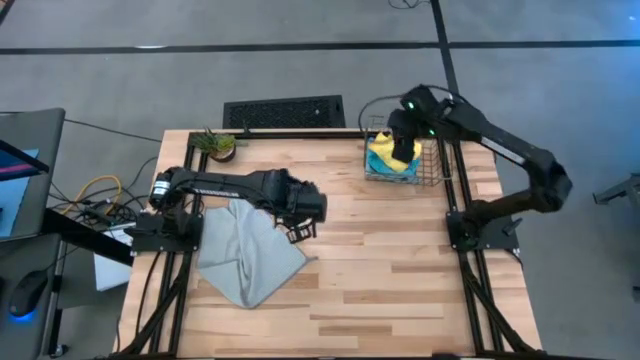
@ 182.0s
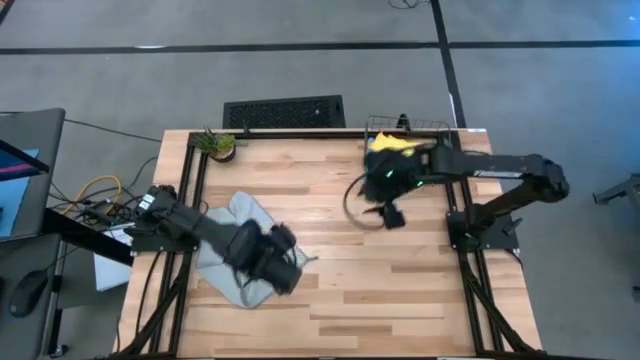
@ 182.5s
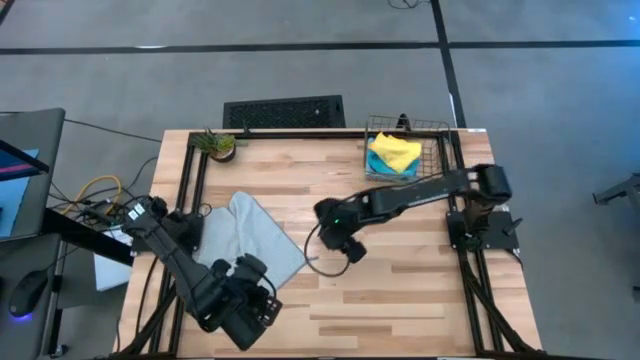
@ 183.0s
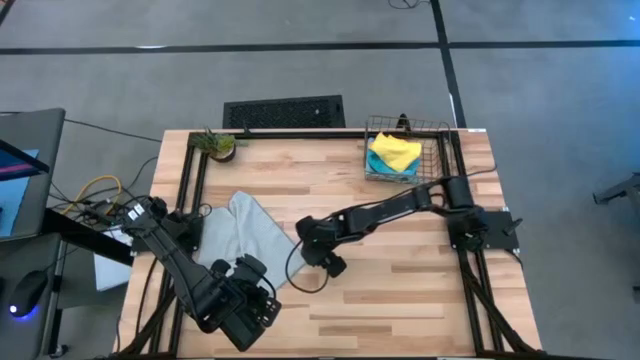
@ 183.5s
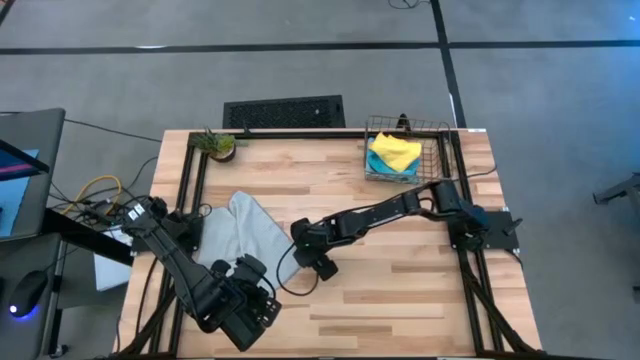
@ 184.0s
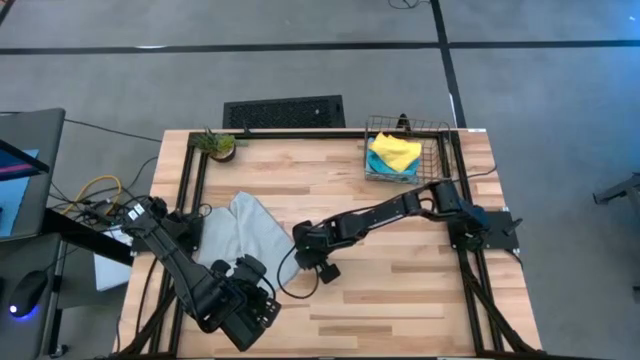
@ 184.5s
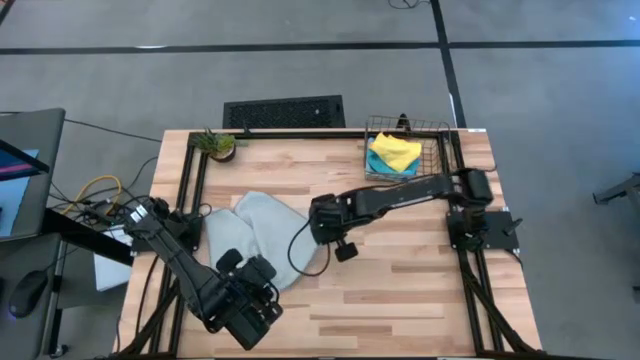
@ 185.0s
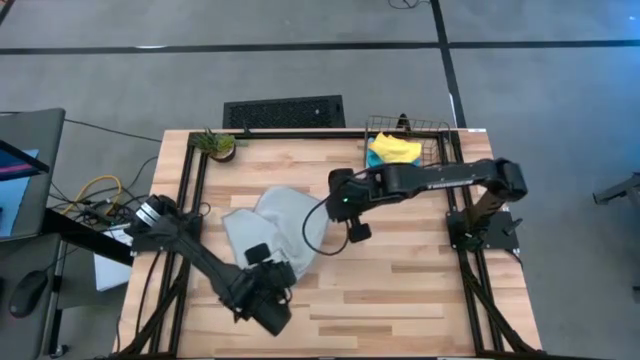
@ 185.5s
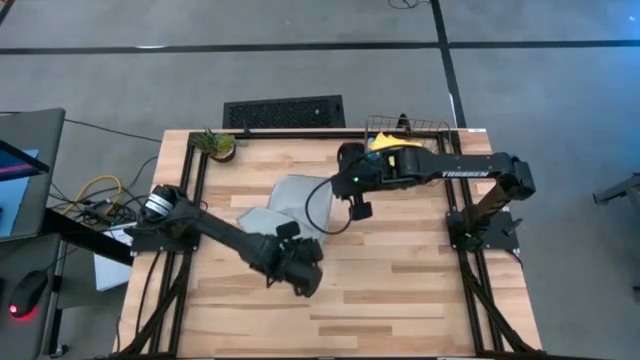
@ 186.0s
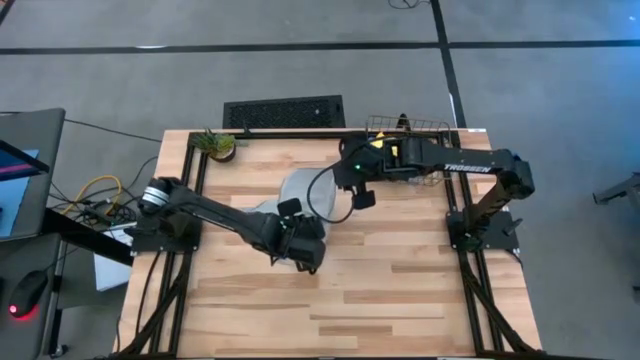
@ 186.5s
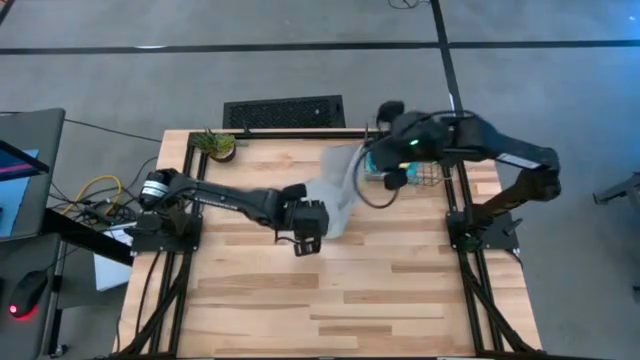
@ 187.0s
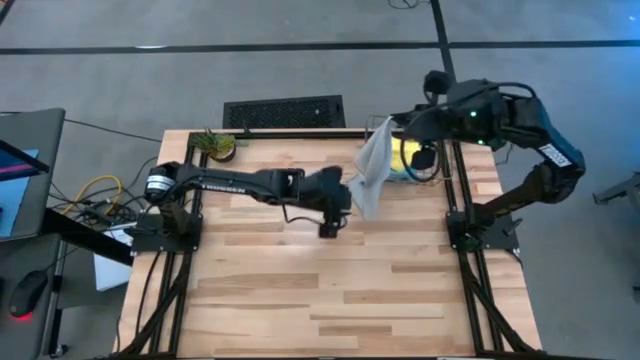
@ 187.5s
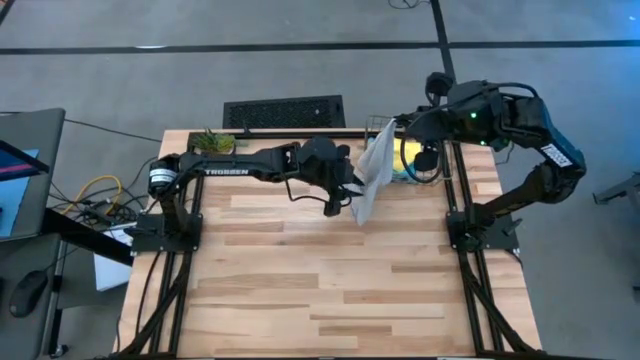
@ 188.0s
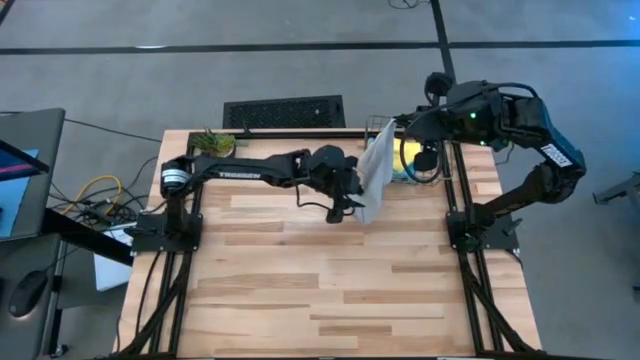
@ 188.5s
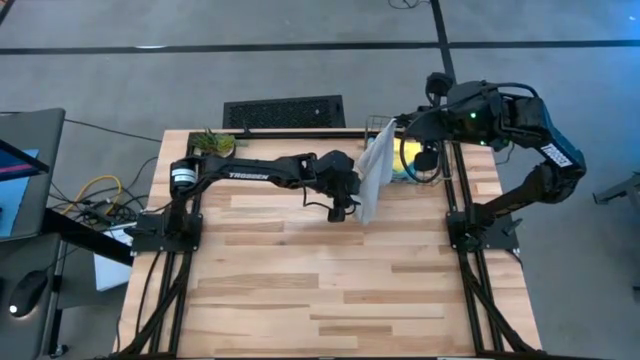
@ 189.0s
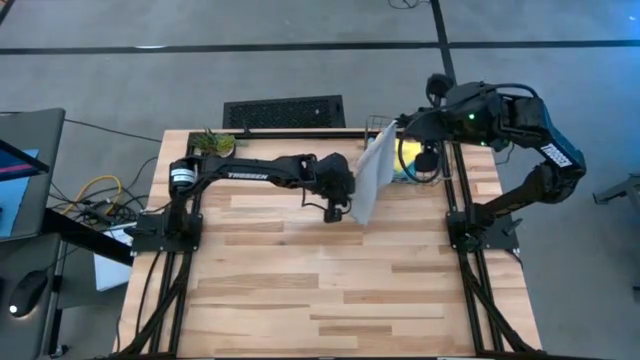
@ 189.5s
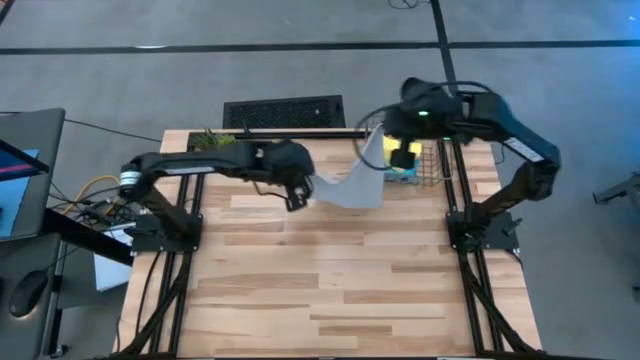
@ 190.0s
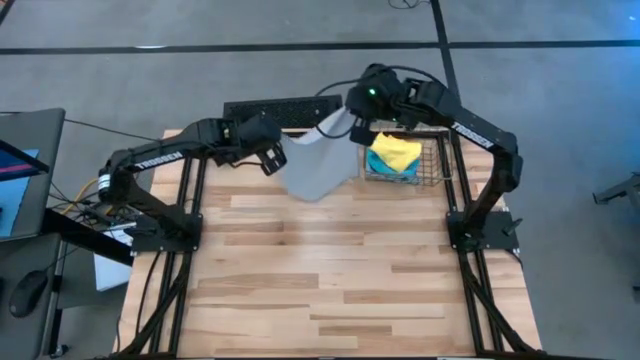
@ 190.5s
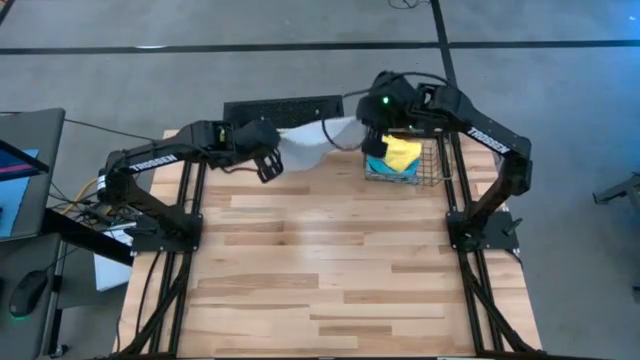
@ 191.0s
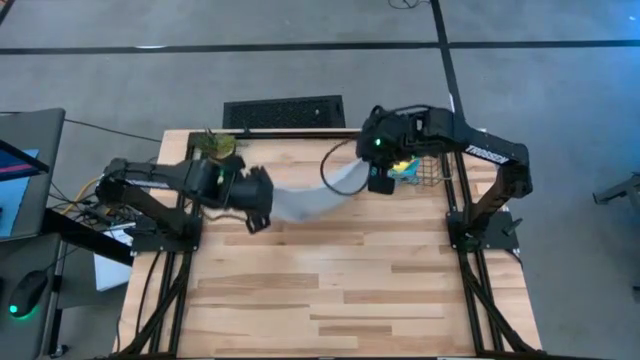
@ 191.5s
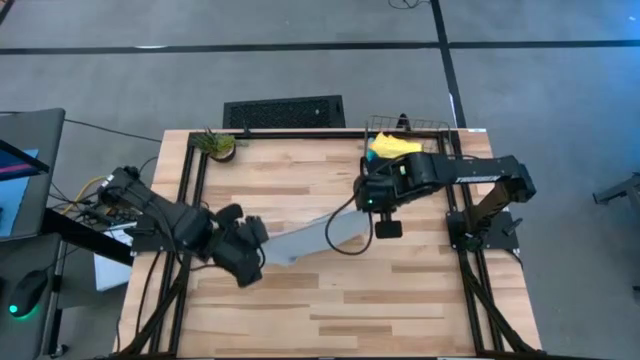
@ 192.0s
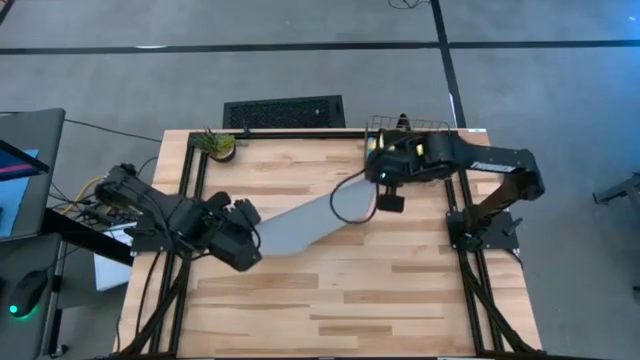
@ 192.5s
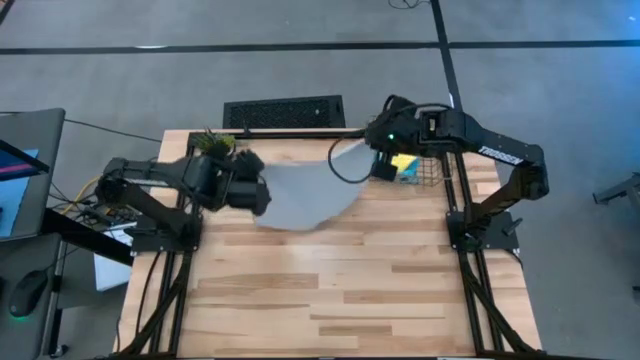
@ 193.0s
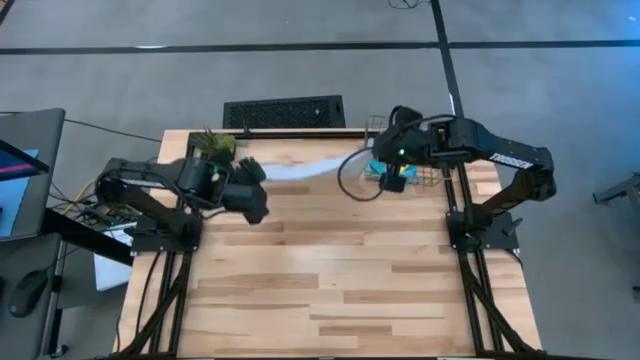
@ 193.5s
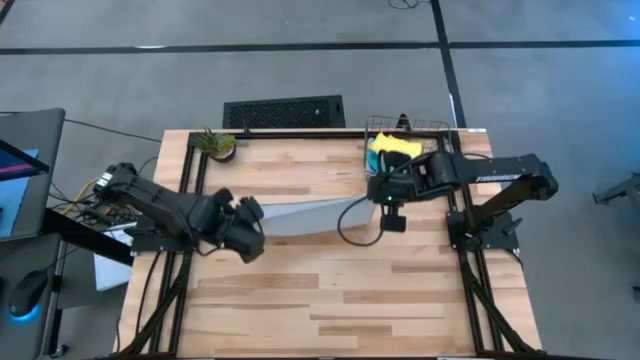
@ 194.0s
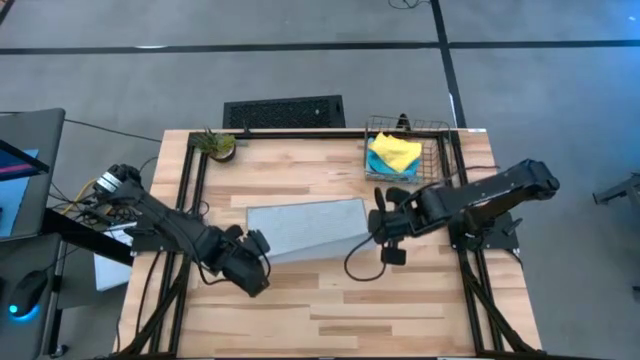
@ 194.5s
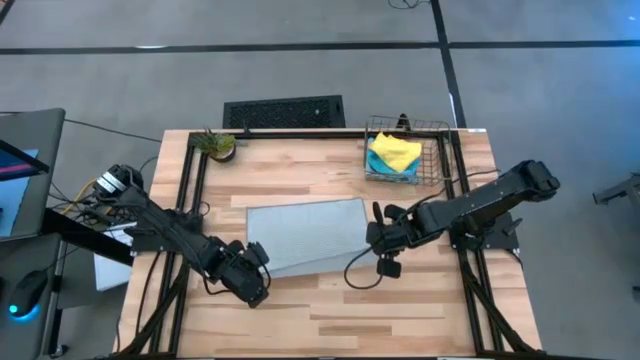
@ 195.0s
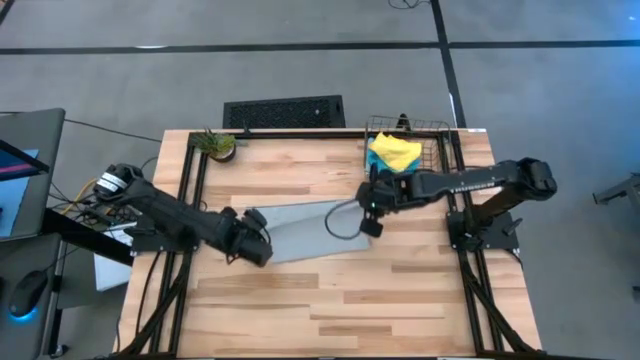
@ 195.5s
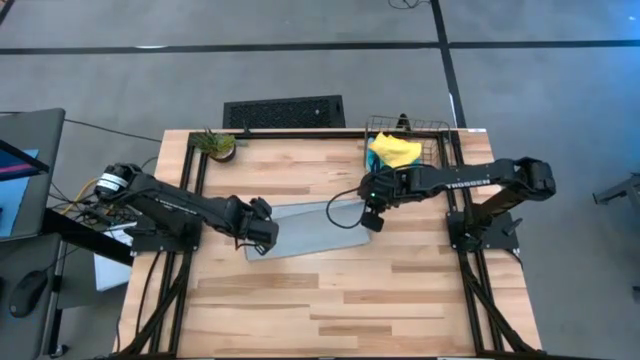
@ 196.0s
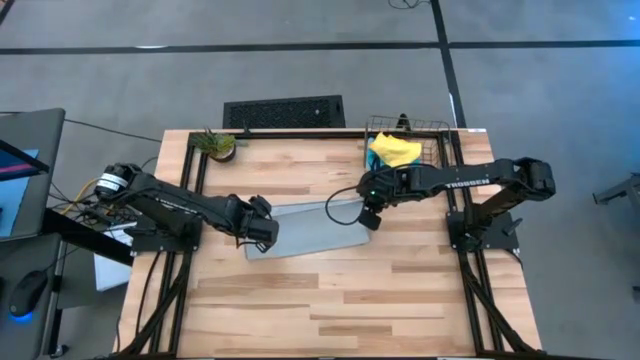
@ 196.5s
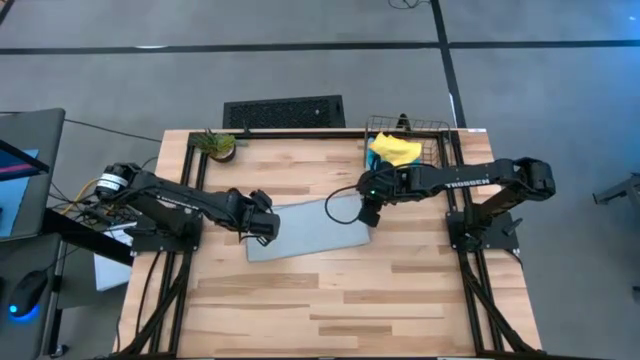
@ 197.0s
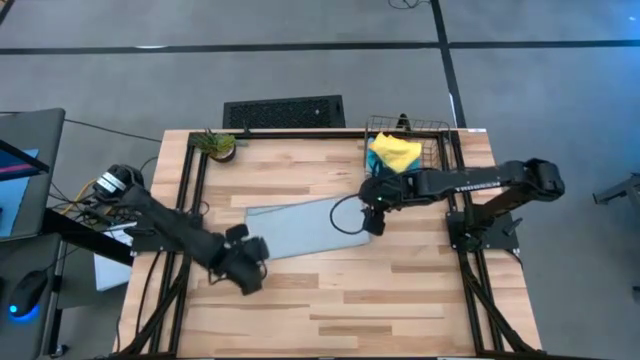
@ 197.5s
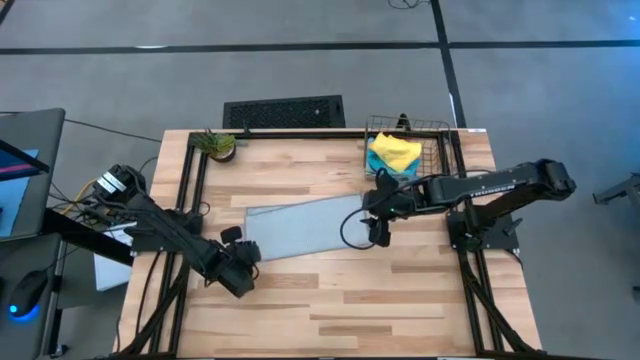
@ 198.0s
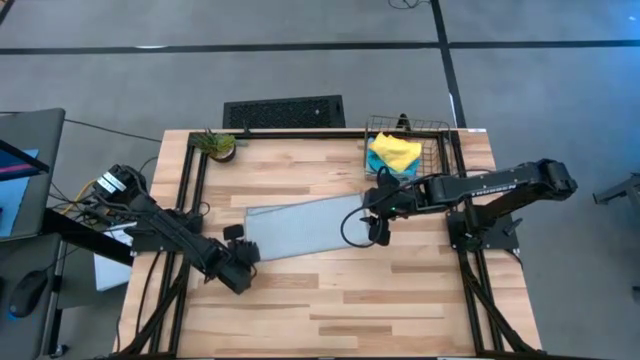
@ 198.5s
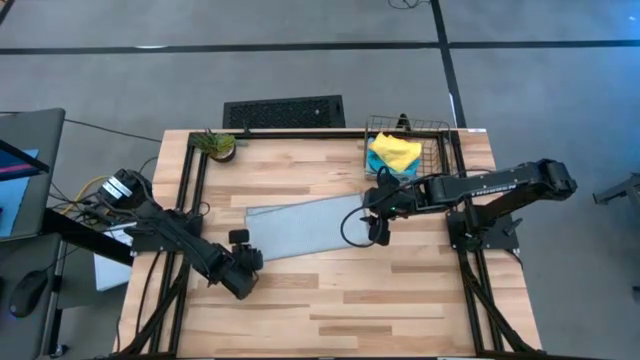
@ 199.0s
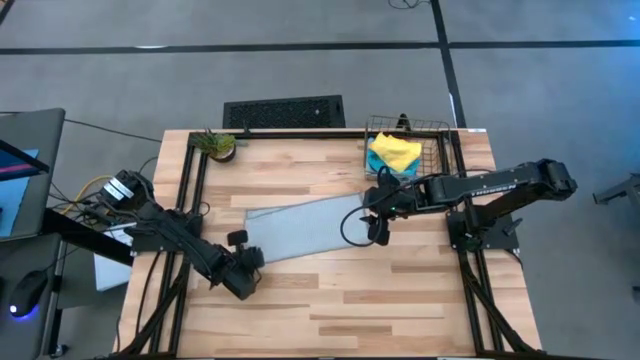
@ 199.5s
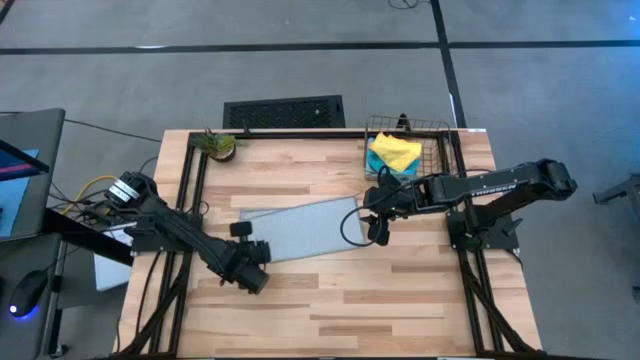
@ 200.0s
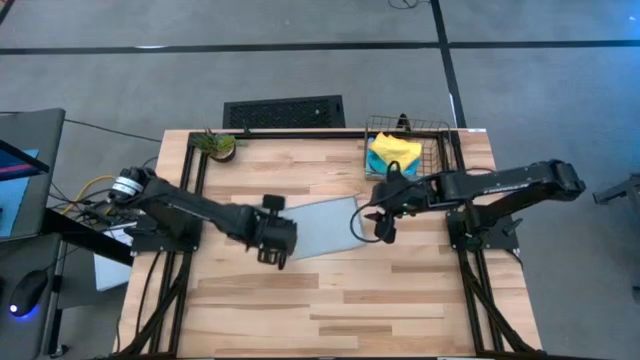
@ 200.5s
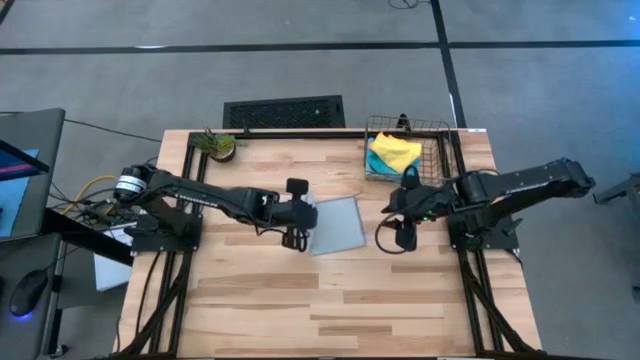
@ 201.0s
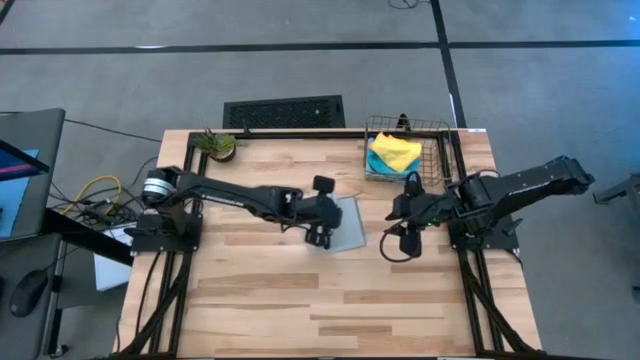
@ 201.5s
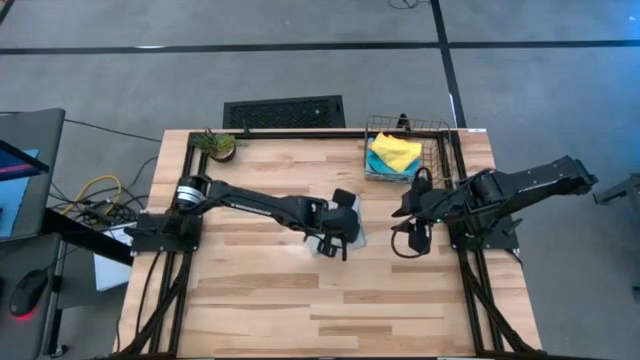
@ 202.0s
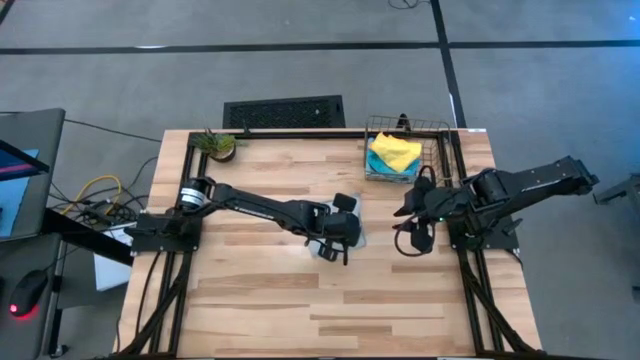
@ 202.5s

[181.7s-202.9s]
Task: Fold microfiber towels
Fold the gray microfiber cloth

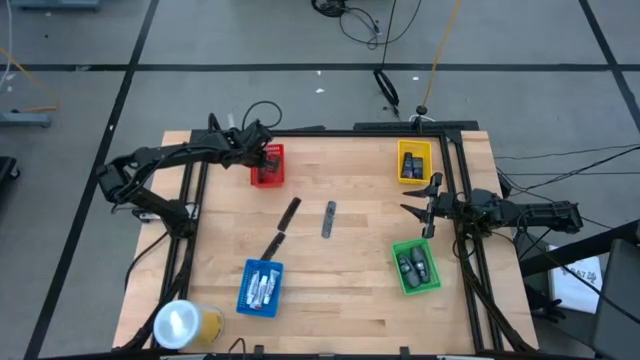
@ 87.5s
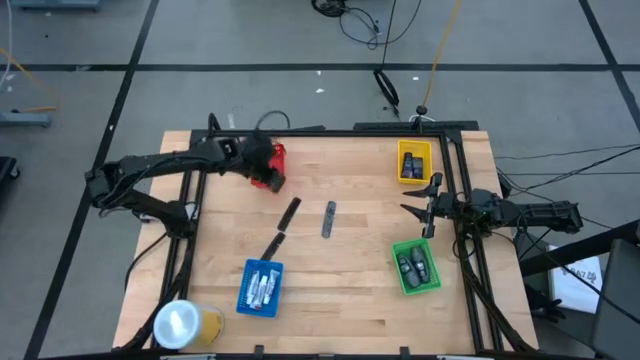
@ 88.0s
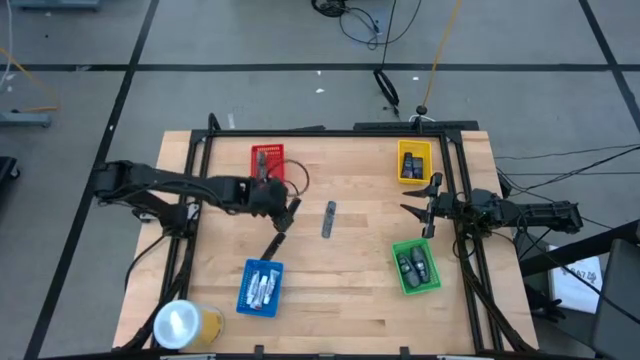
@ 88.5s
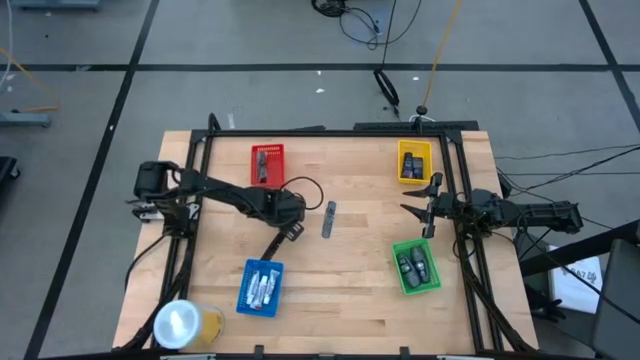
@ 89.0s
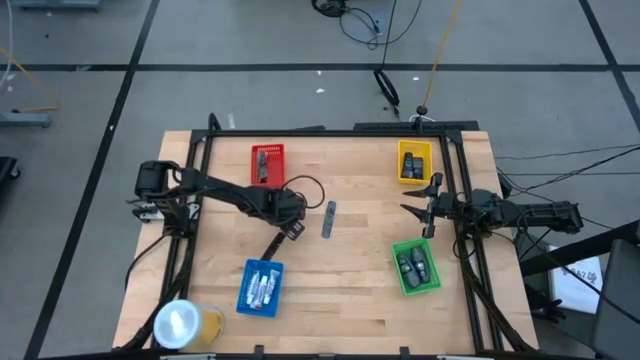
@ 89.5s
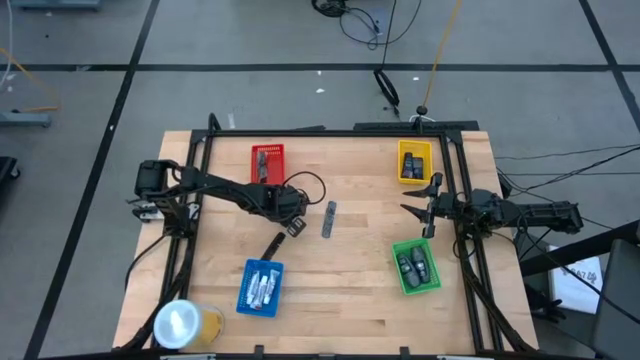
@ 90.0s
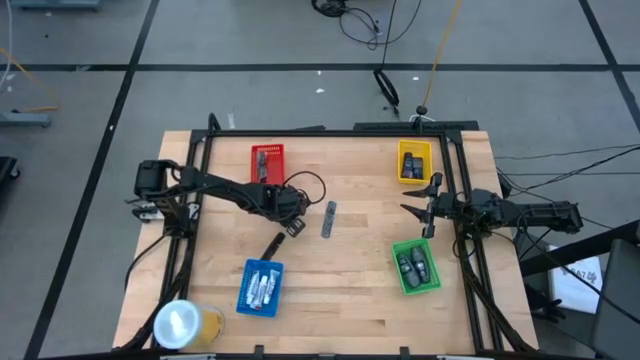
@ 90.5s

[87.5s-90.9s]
Task: Pick & Place Travel size toiletries
Put the top left black comb into the orange basket
